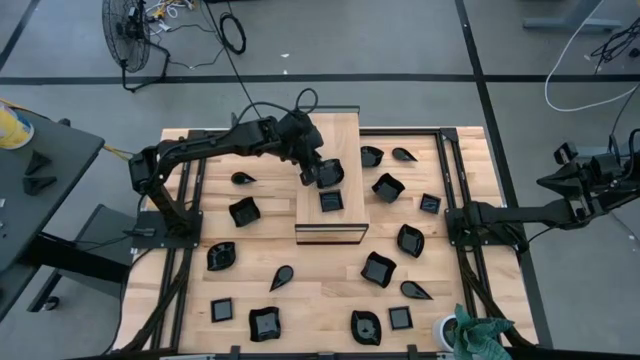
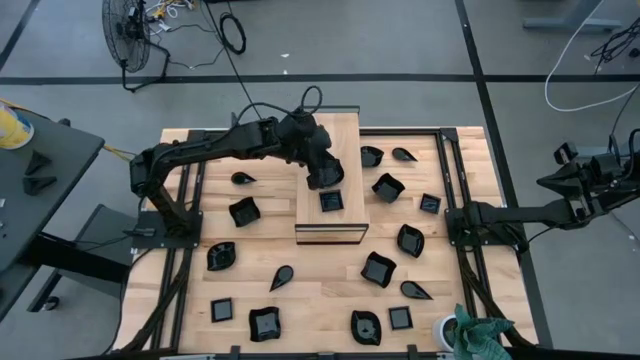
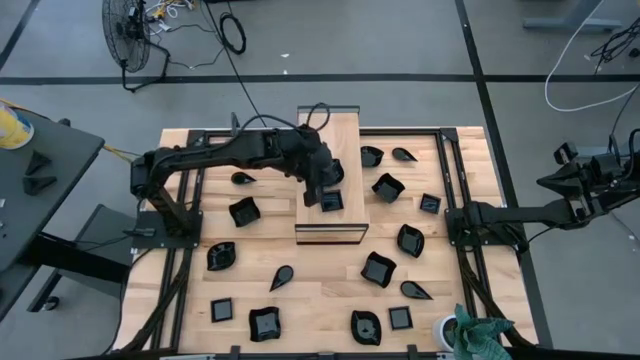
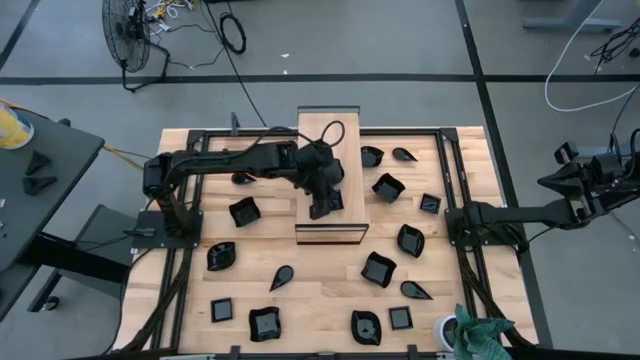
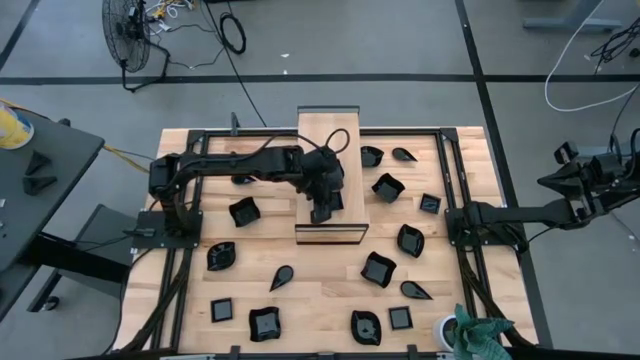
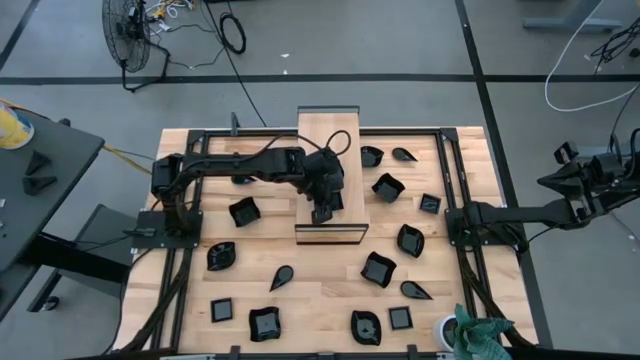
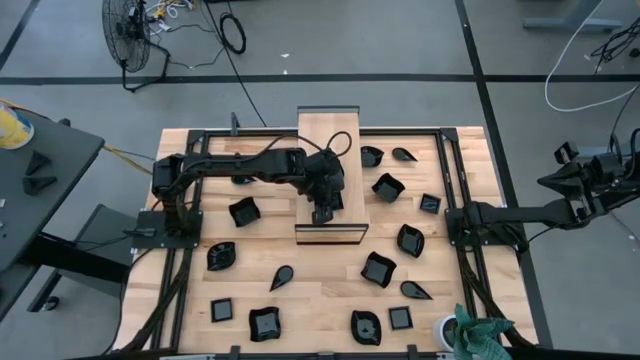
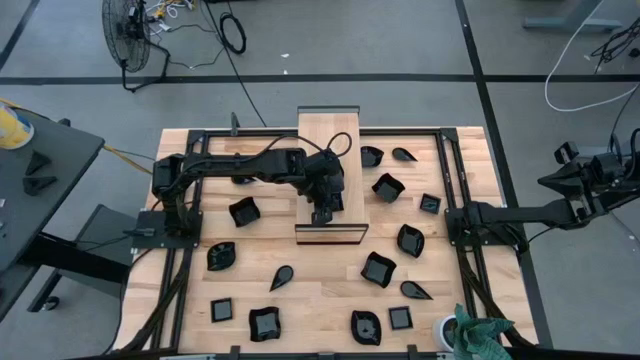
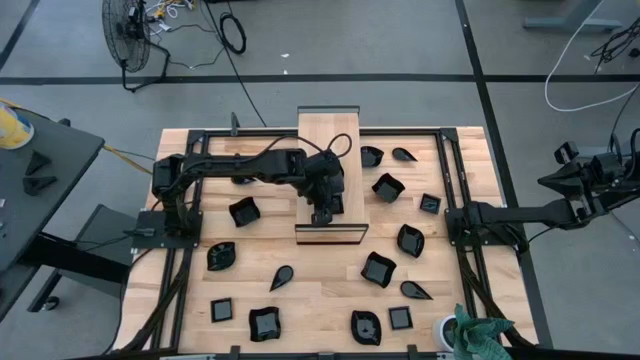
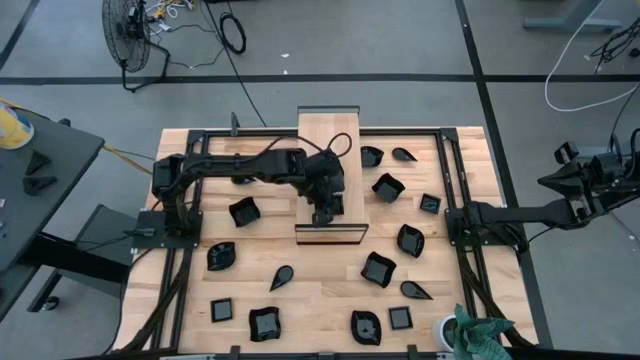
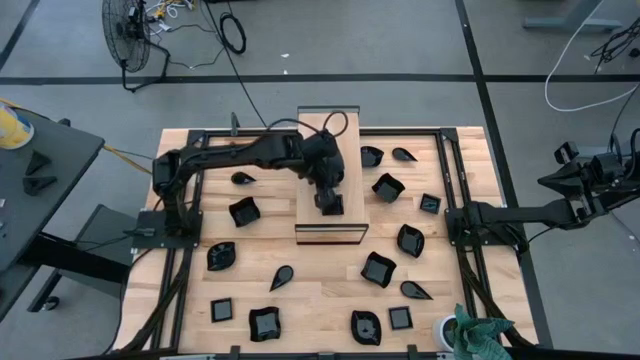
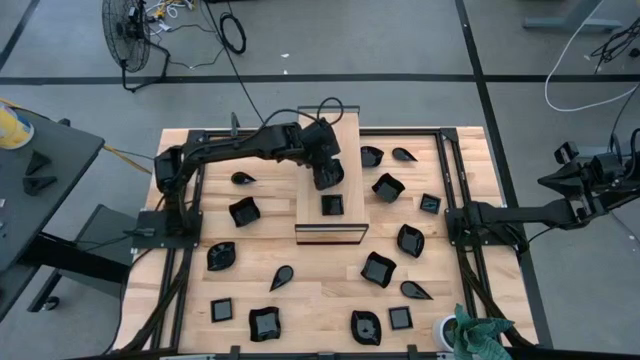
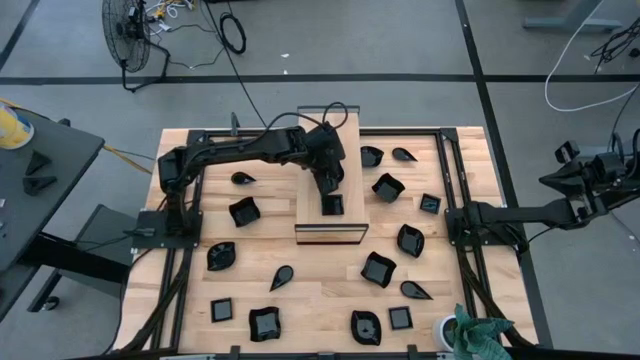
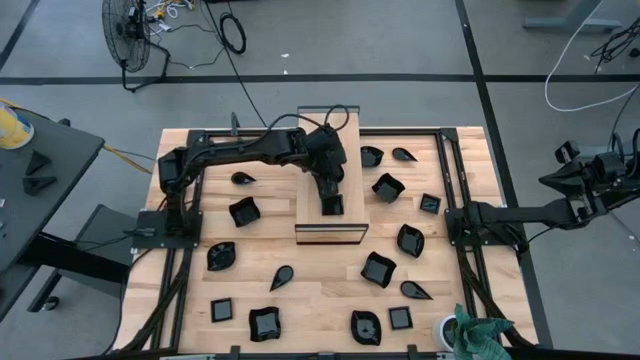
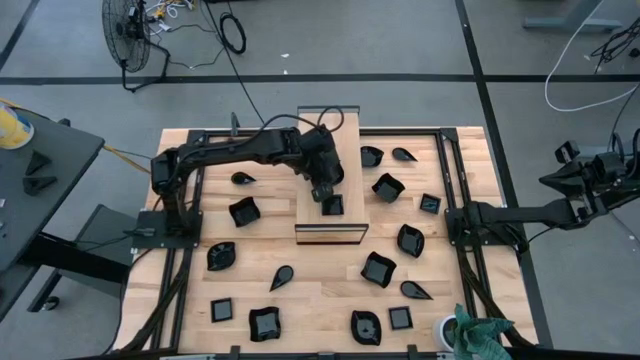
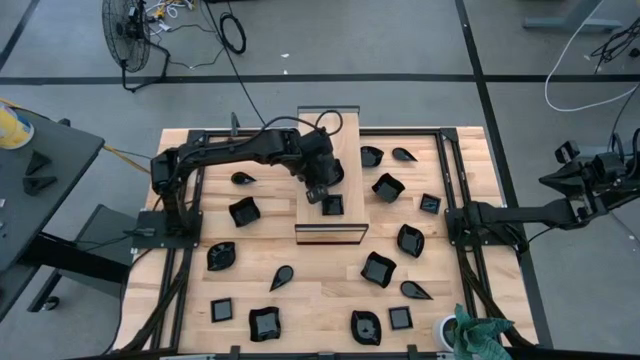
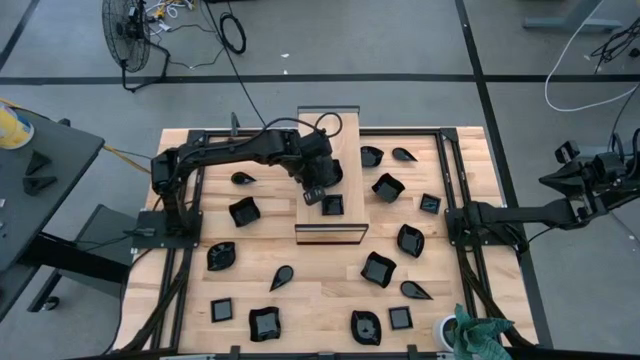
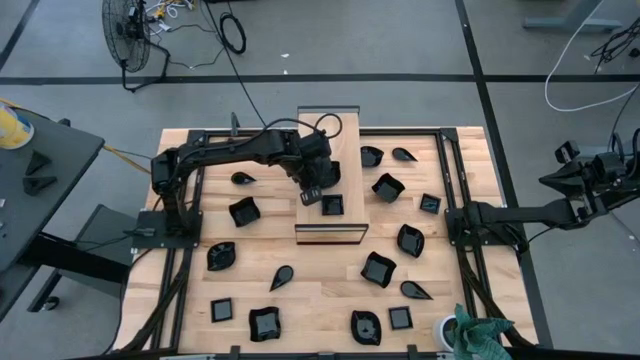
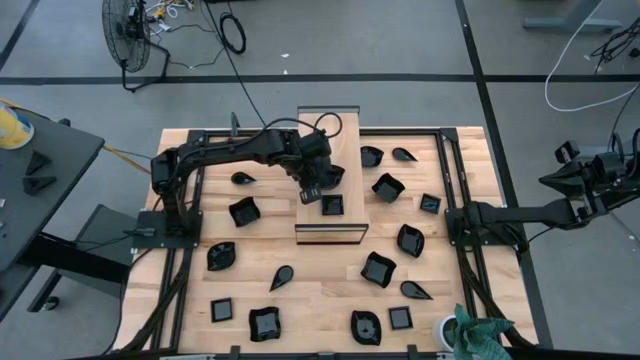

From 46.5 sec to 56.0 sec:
Task: Pick & Place Mini shaped plates
Adjust the square plate and the leaf-shaped plate on the shelf

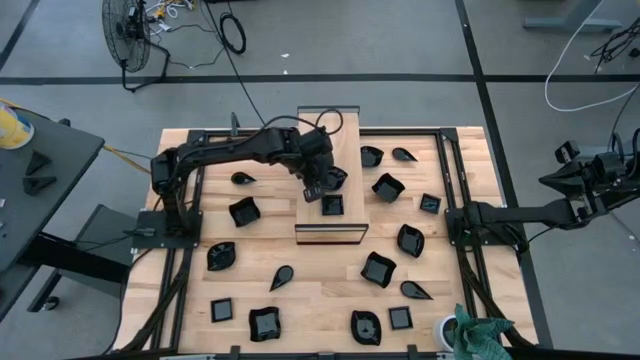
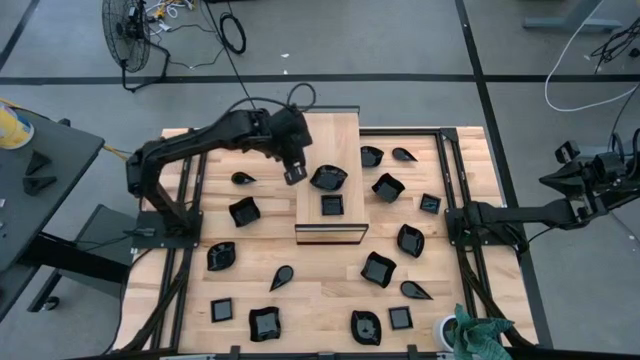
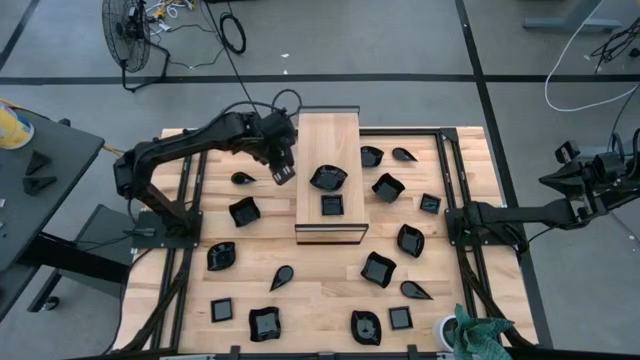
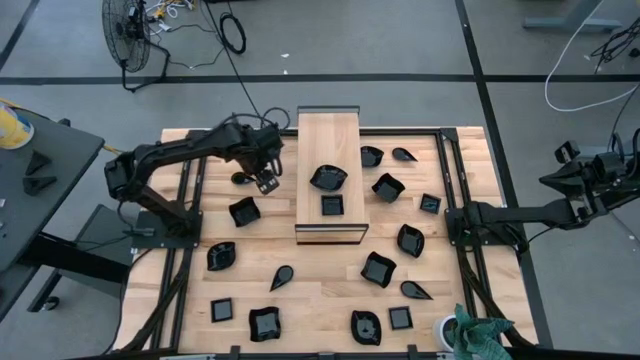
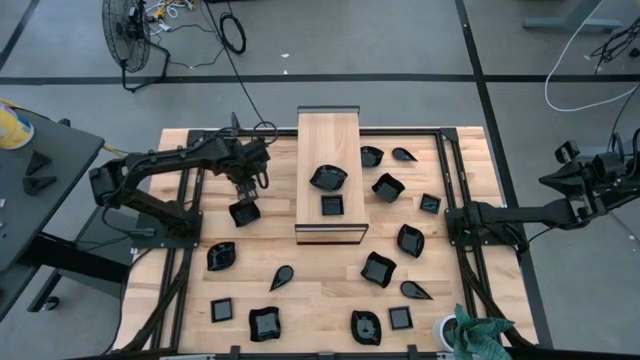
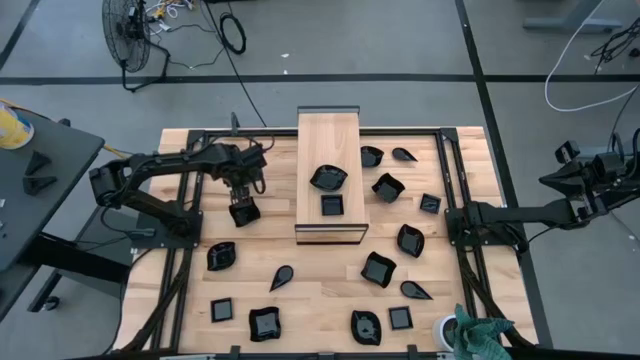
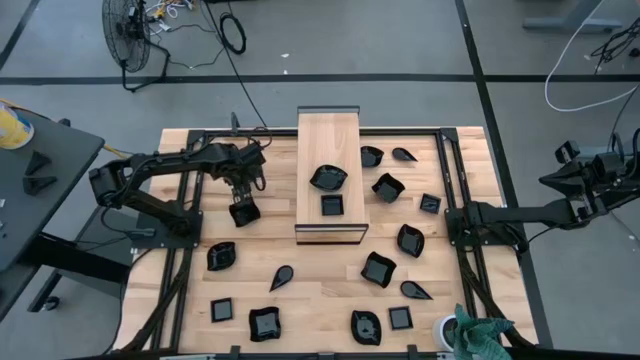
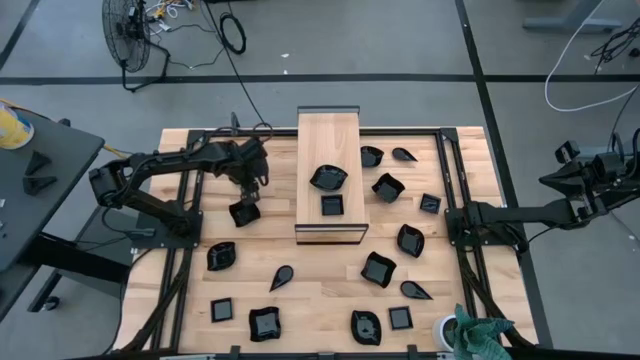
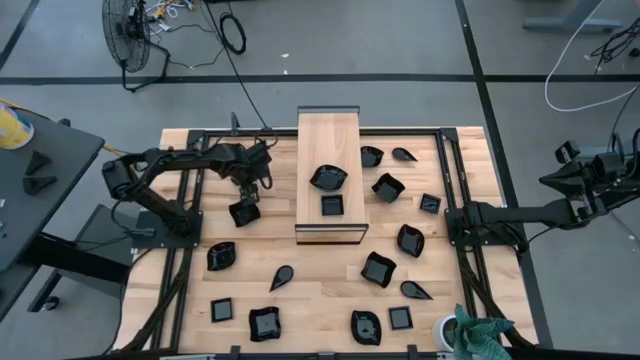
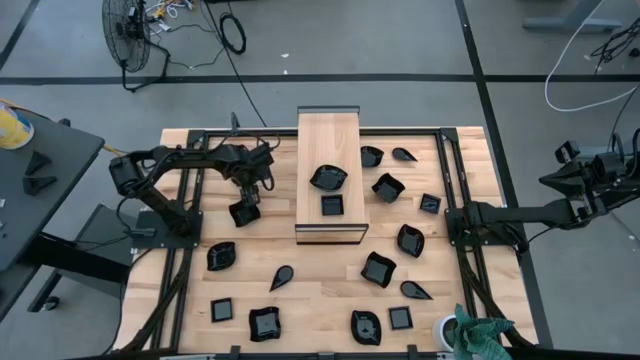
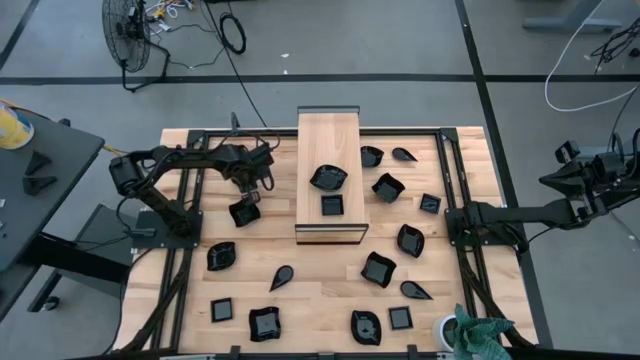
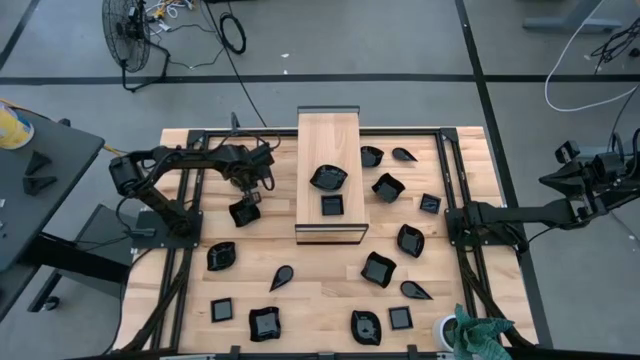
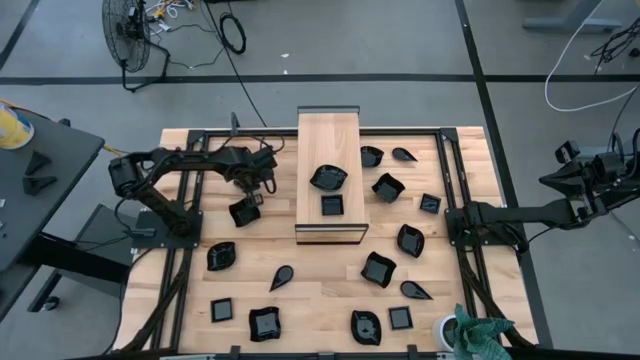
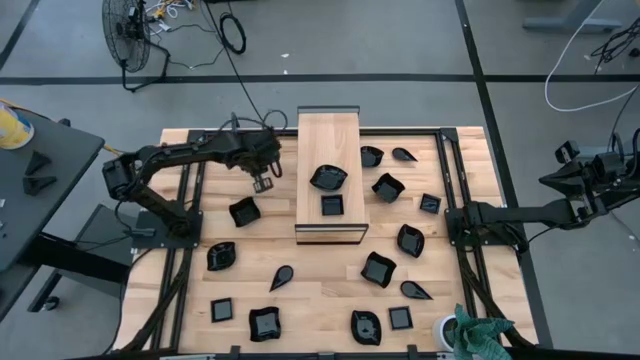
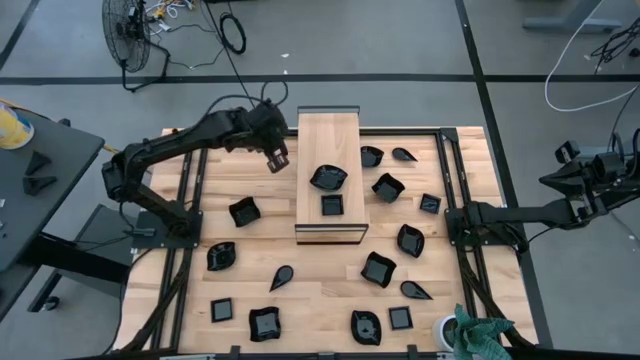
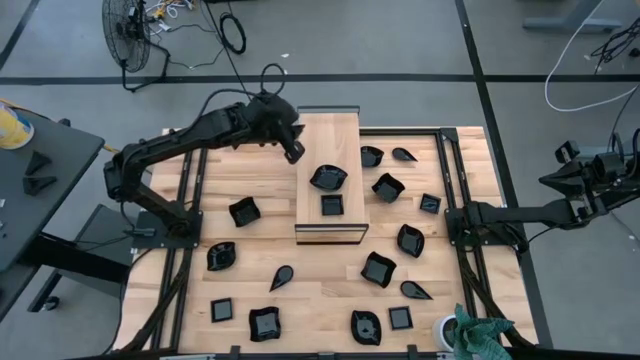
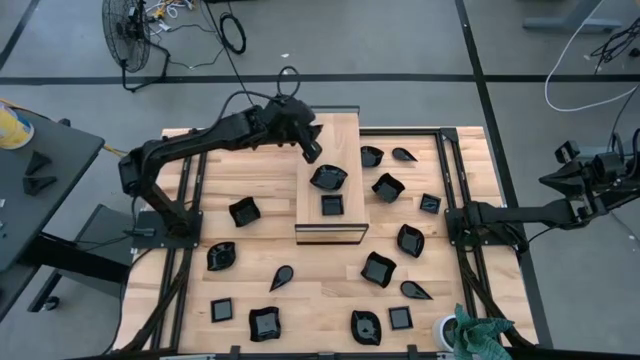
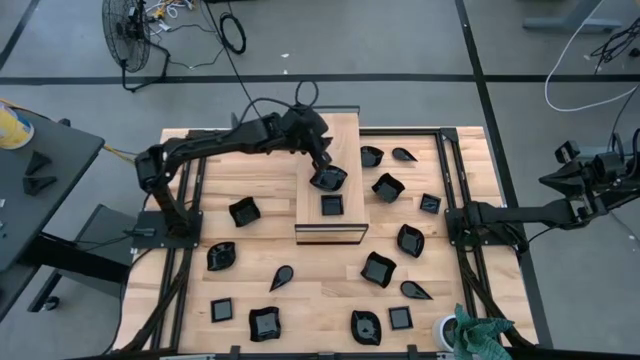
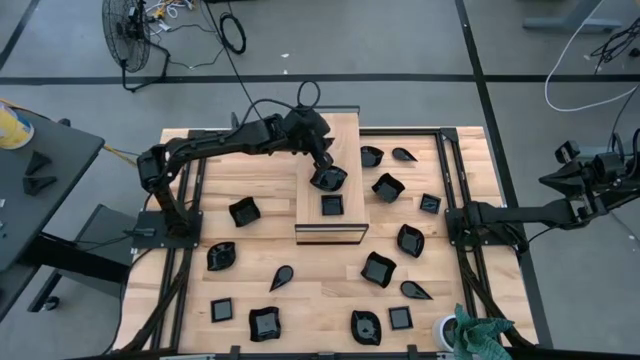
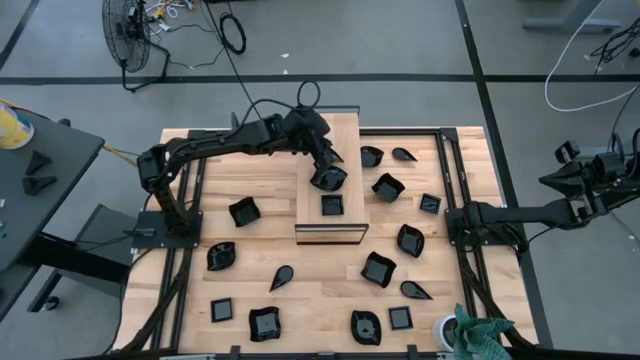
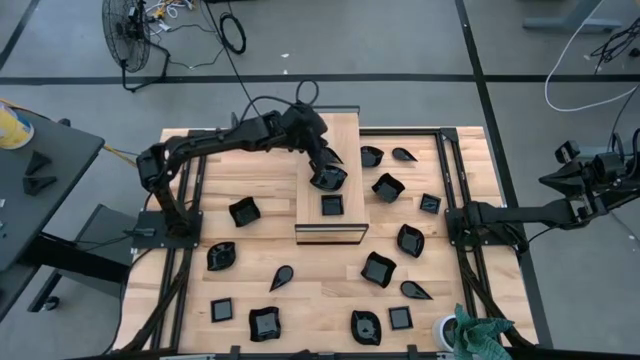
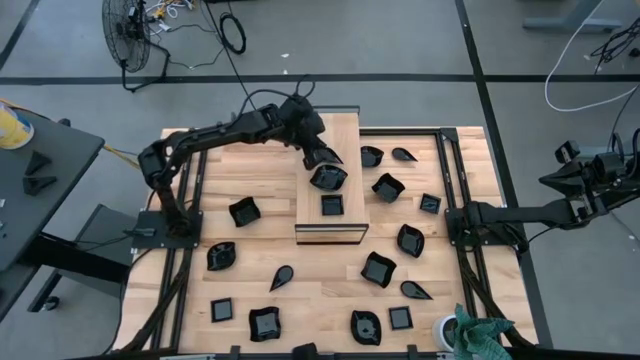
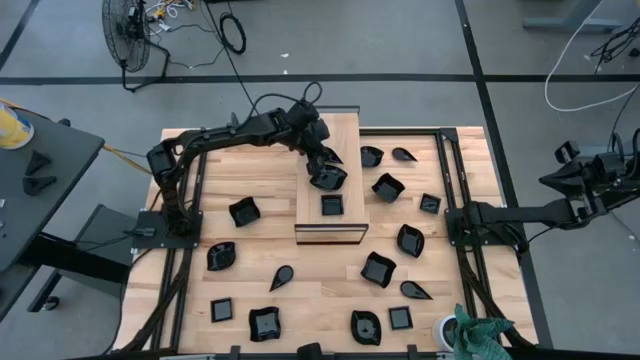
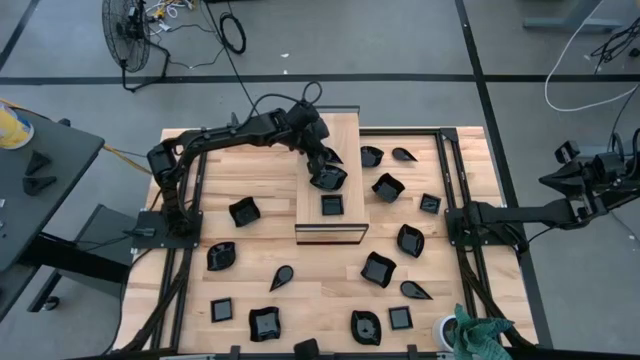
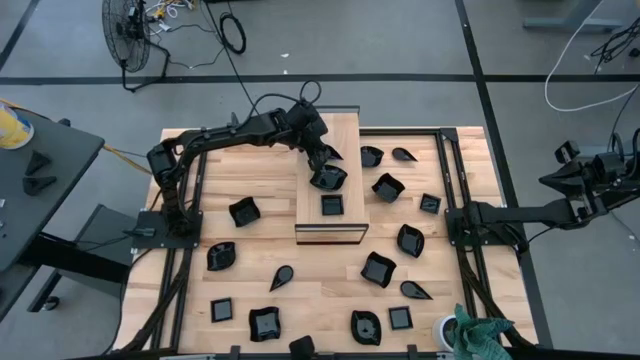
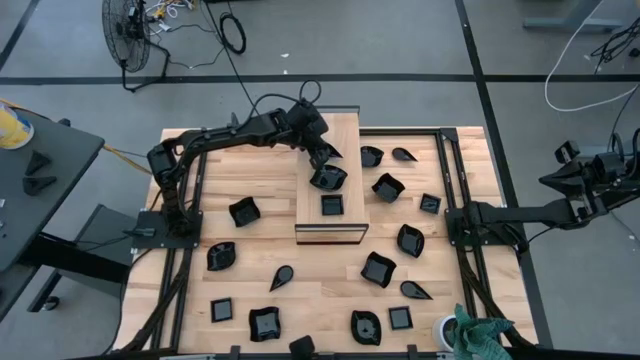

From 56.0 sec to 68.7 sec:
Put the drop-shaped plate on the shelf
